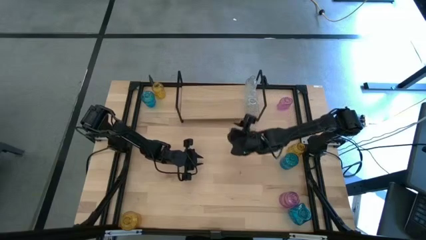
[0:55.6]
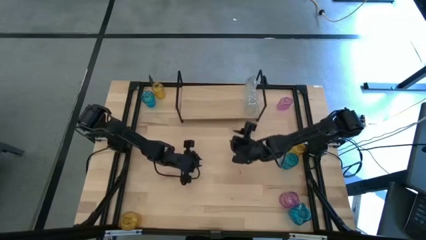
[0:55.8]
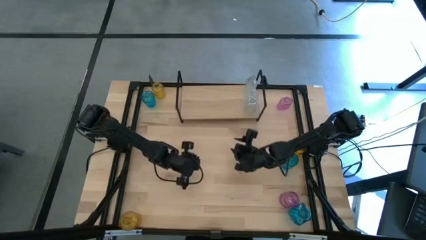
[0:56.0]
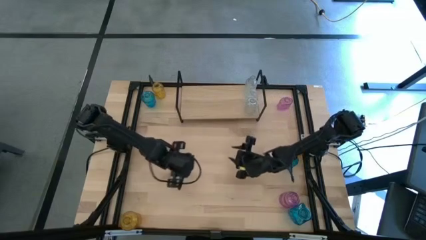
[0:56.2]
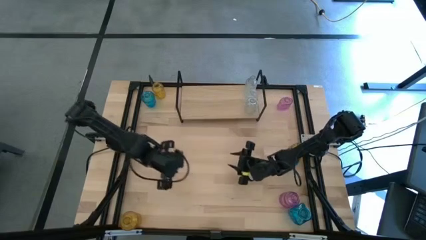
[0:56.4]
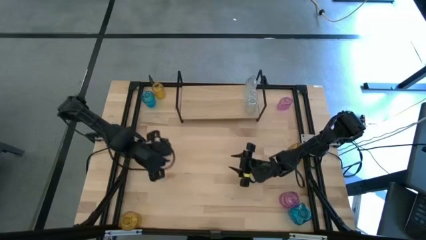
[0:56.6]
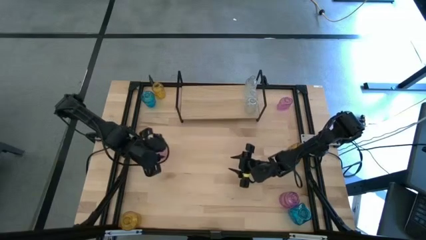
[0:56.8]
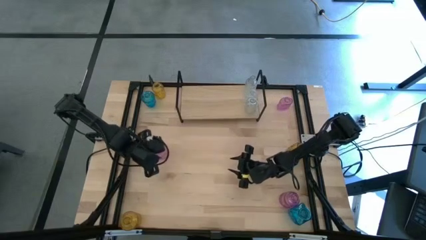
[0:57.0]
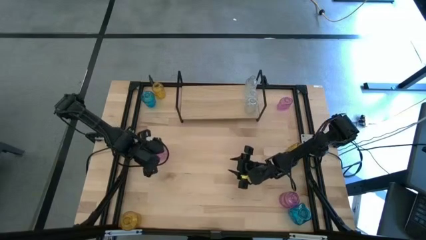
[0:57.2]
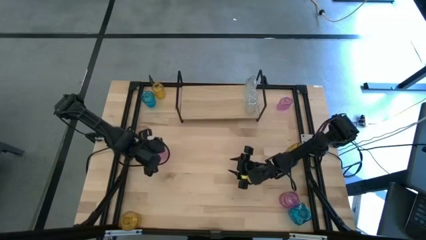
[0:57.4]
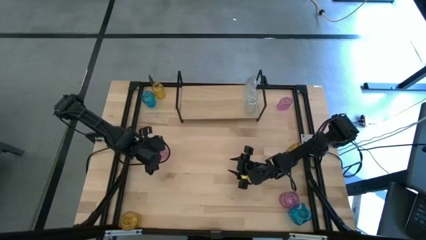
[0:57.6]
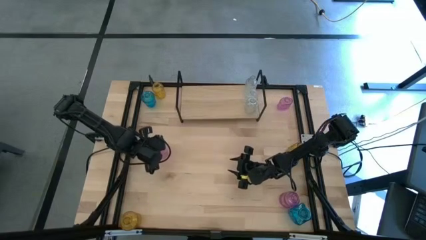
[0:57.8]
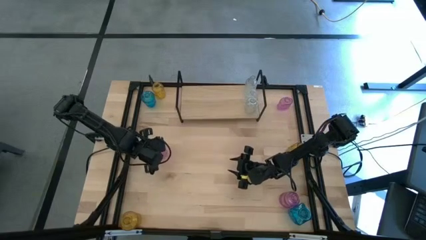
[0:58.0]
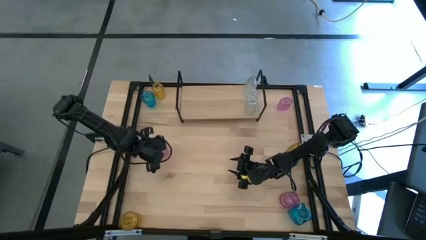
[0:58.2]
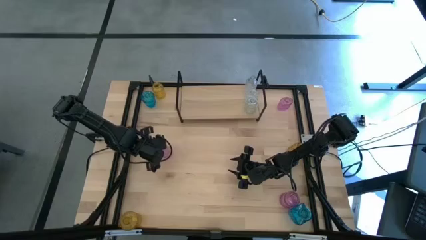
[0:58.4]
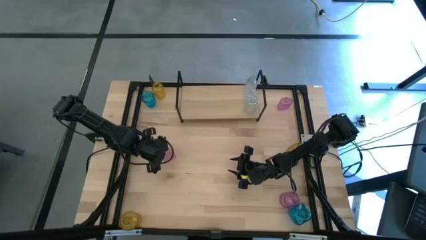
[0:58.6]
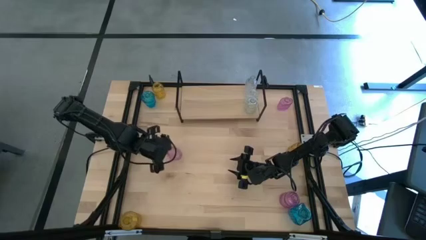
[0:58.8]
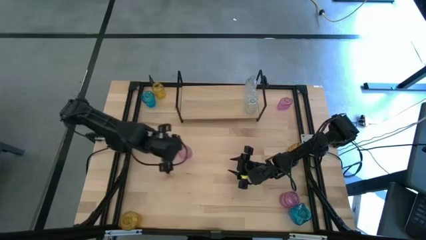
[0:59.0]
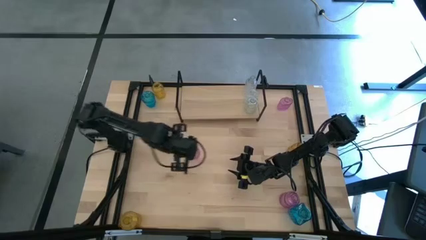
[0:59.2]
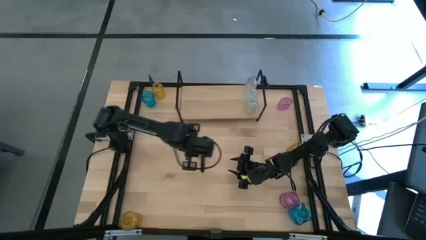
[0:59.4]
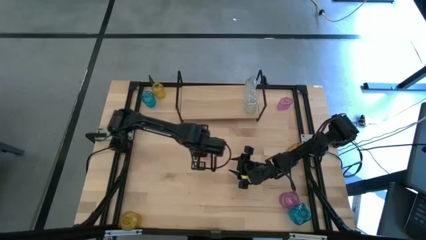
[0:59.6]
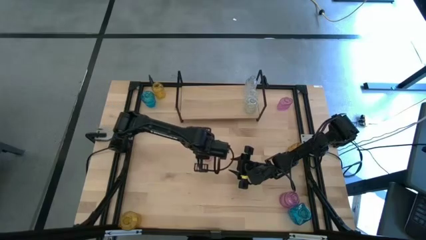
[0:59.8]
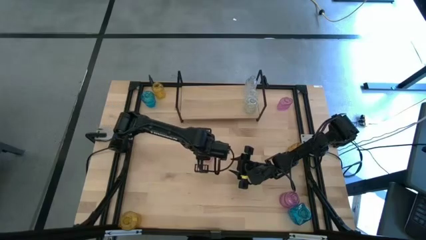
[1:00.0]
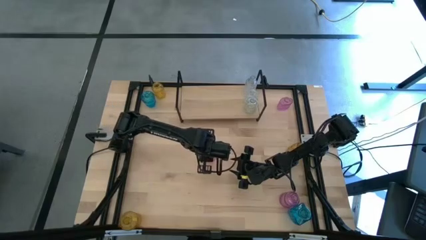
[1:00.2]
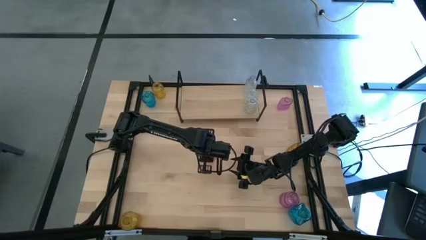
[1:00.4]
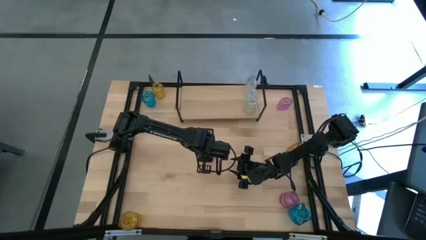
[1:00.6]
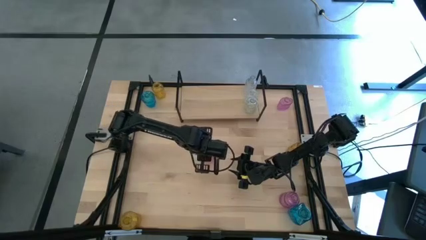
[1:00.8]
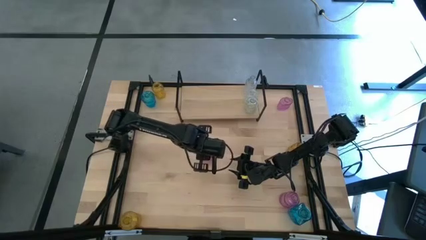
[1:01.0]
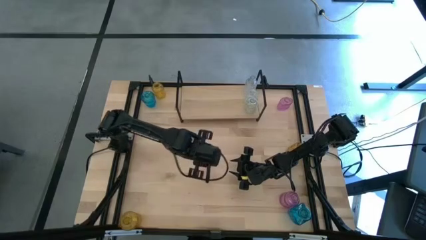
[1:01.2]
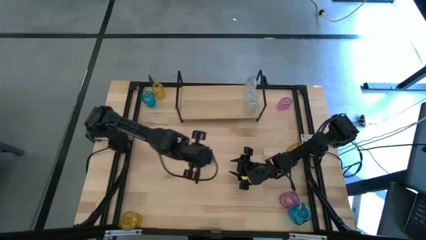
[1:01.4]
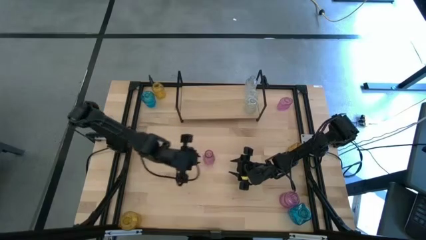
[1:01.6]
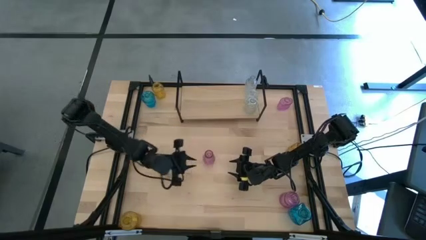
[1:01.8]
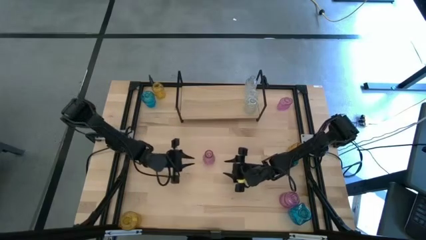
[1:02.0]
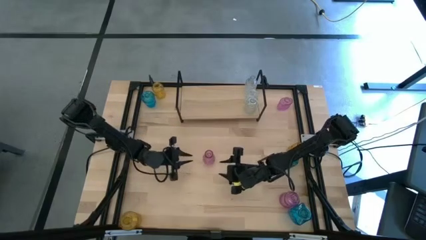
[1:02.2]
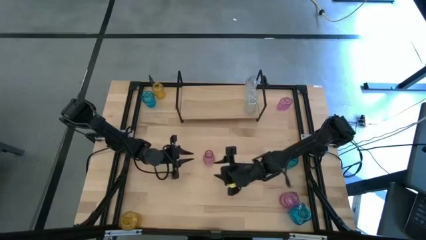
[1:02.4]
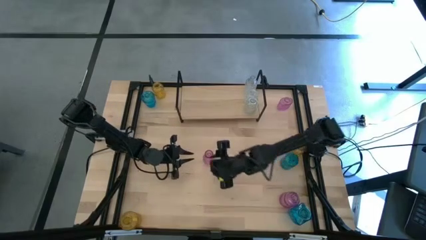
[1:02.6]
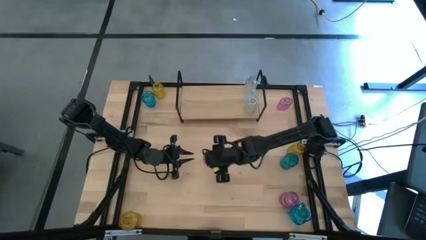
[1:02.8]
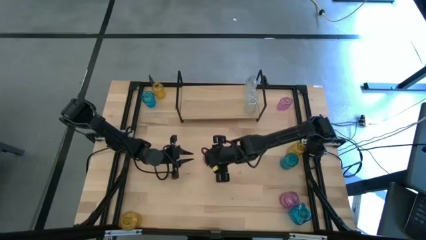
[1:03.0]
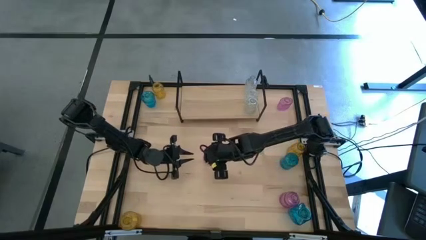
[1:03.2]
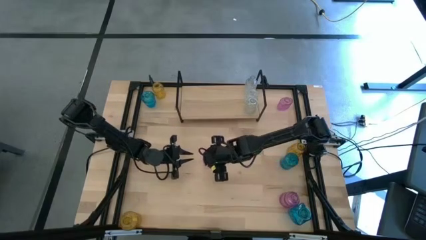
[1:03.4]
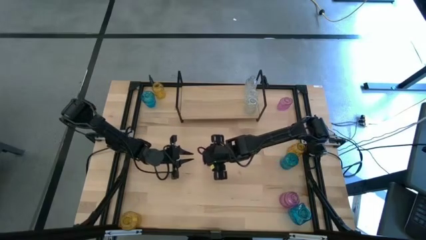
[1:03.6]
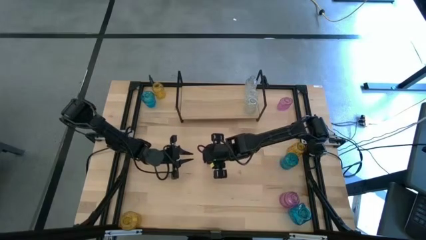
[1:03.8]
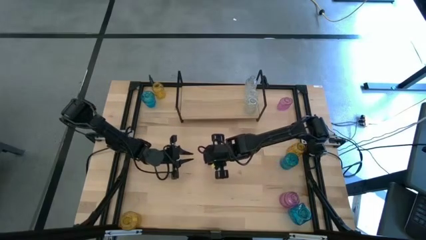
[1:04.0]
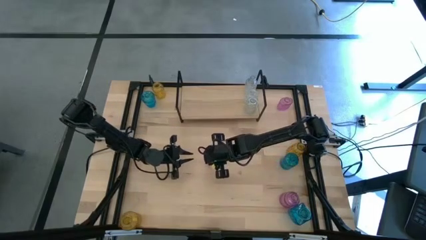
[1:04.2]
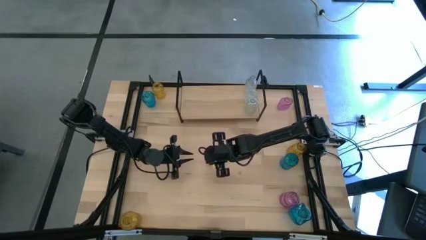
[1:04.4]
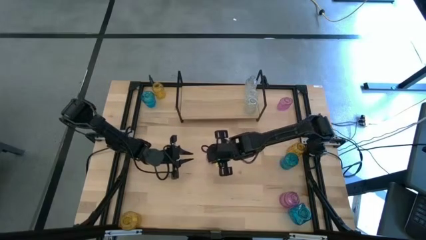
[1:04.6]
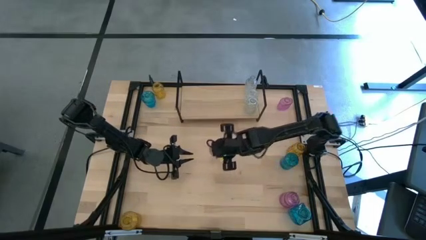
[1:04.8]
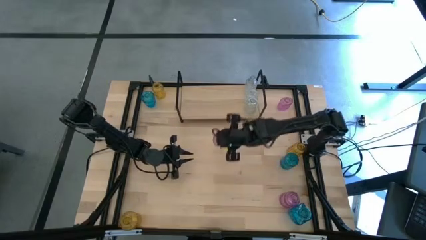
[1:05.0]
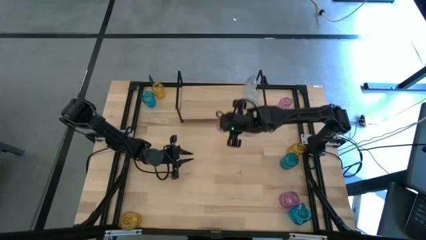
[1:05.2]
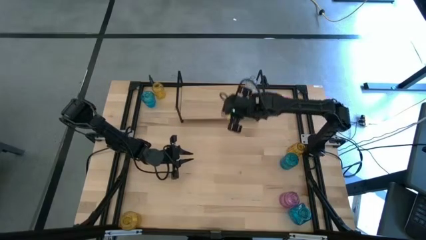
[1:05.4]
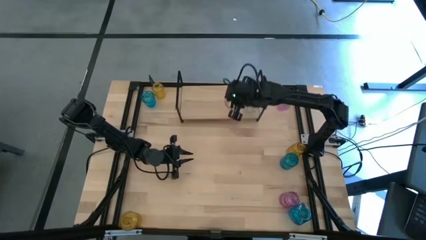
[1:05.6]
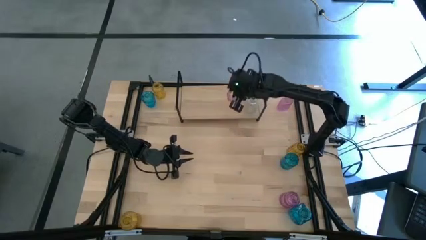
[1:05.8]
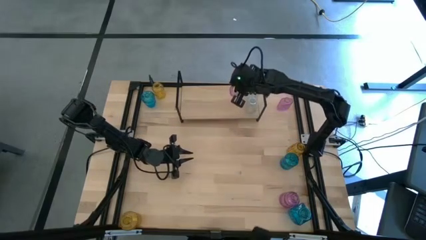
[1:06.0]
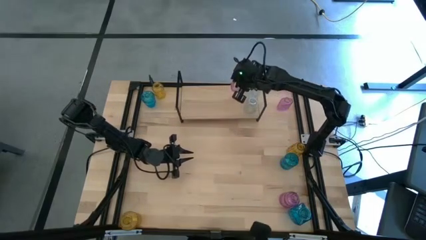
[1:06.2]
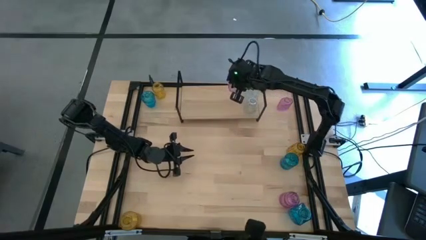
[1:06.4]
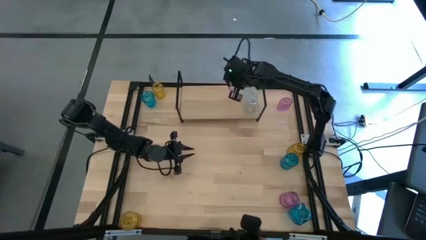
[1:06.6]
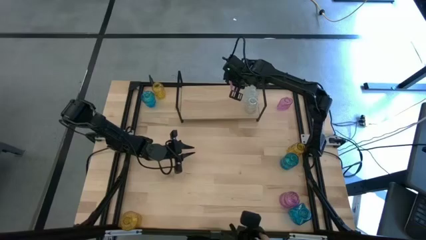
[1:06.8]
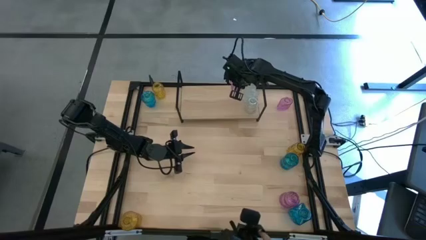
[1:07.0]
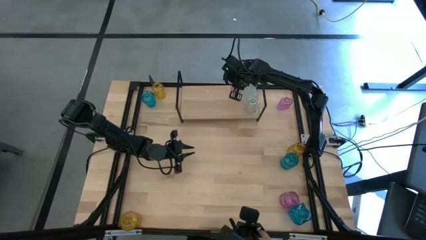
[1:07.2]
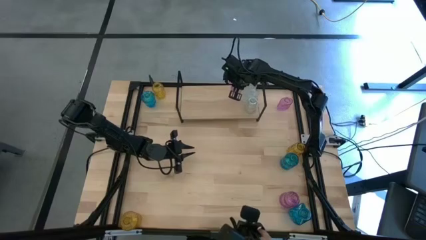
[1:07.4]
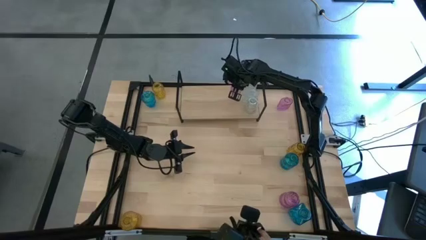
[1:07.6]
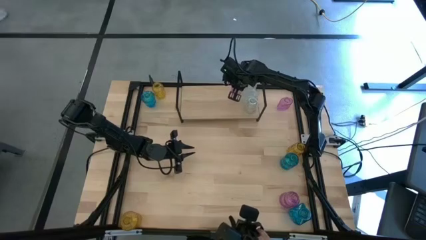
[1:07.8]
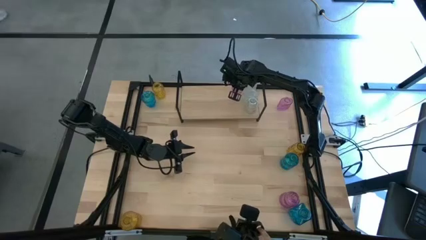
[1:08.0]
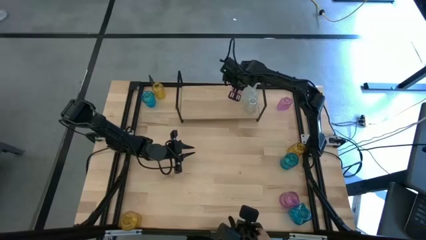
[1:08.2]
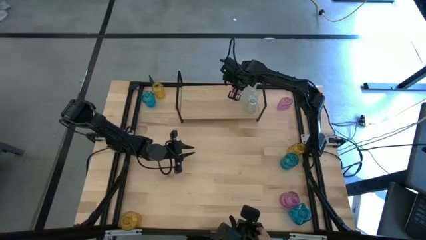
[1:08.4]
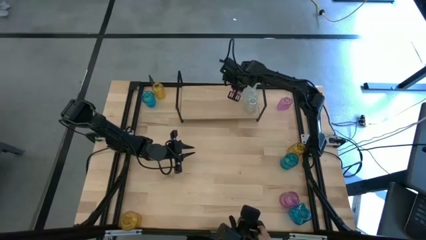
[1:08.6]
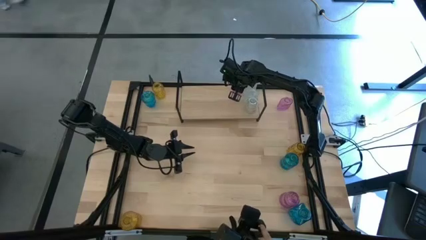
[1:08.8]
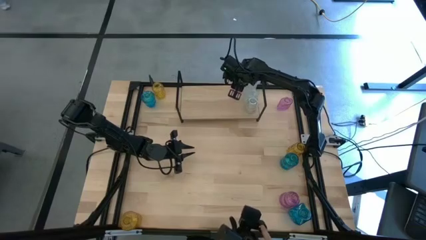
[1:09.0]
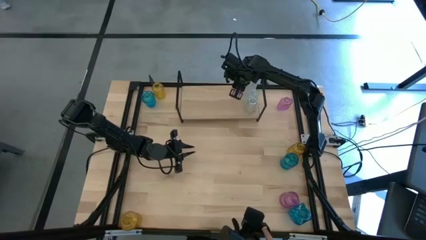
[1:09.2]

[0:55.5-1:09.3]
Task: sort vases onto shelf
Put the left violet vase to the left side of the top transparent vase on the shelf

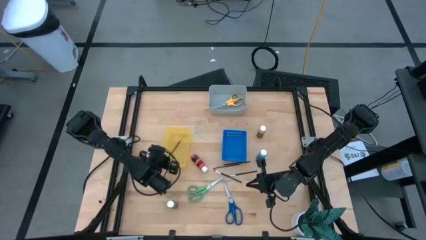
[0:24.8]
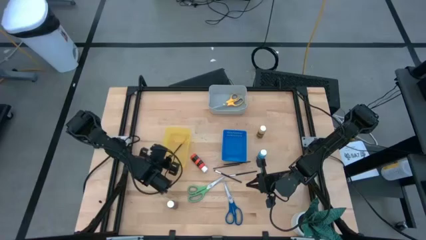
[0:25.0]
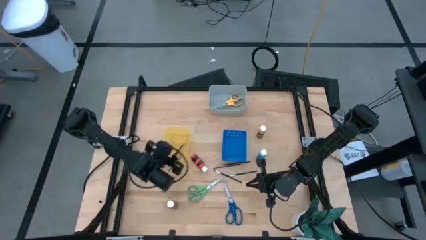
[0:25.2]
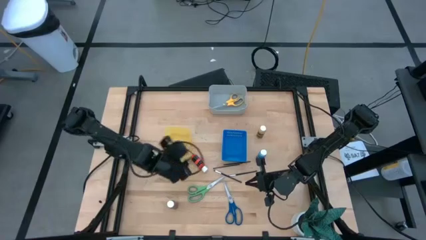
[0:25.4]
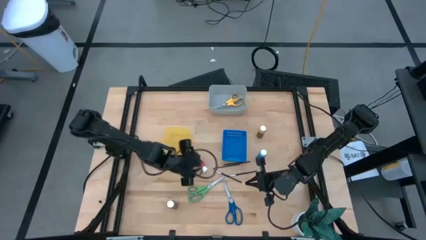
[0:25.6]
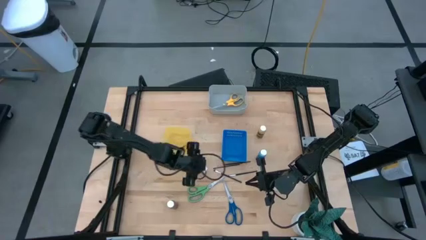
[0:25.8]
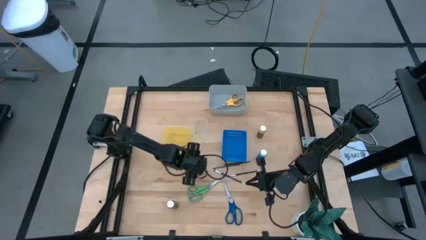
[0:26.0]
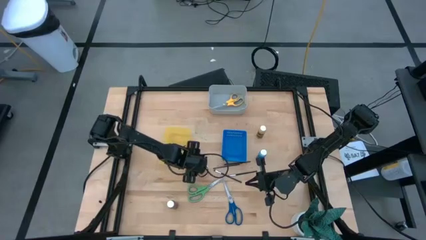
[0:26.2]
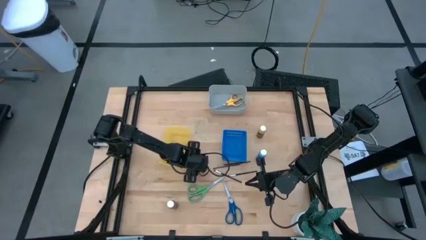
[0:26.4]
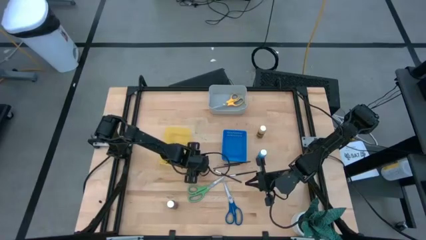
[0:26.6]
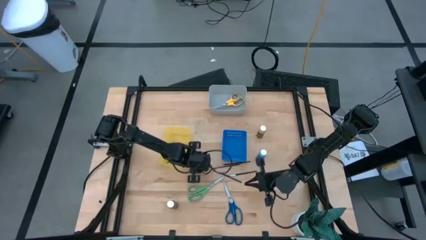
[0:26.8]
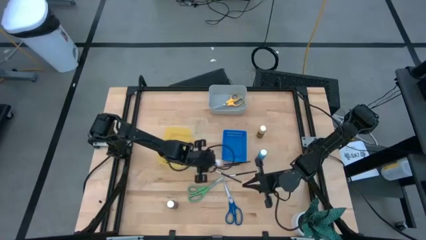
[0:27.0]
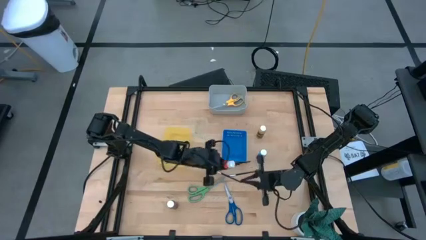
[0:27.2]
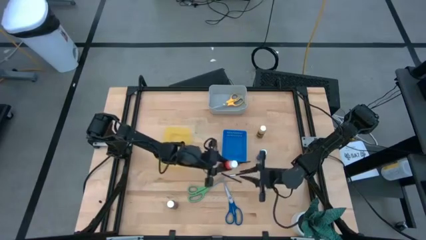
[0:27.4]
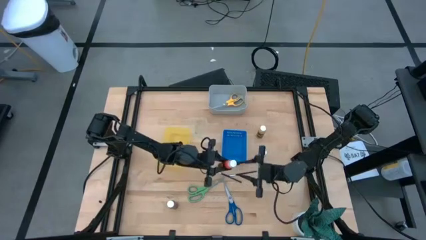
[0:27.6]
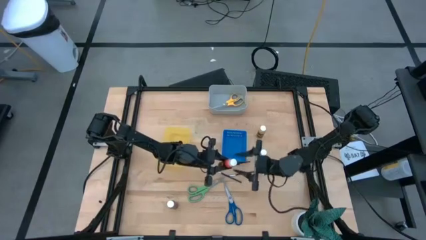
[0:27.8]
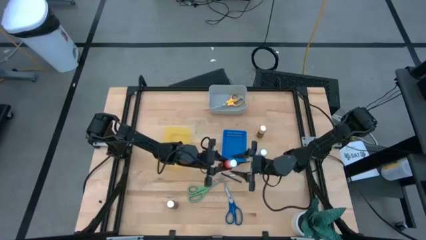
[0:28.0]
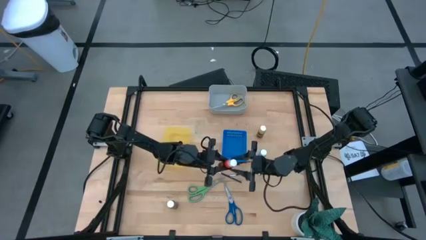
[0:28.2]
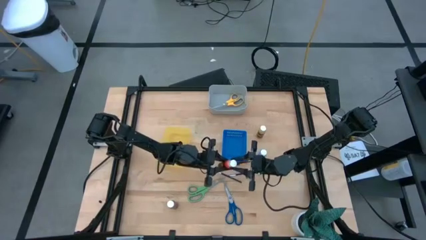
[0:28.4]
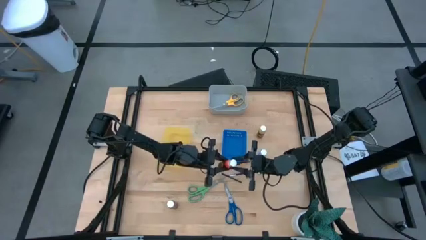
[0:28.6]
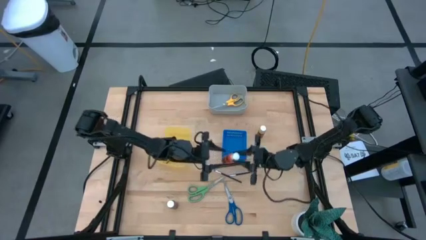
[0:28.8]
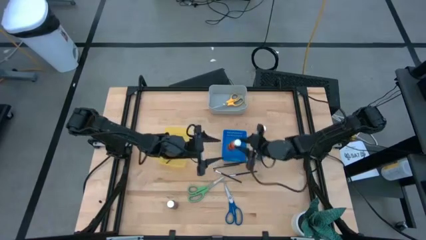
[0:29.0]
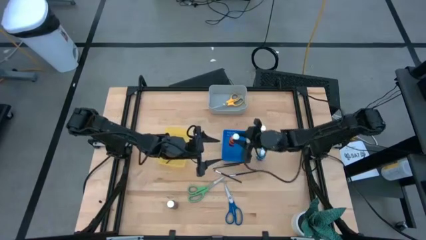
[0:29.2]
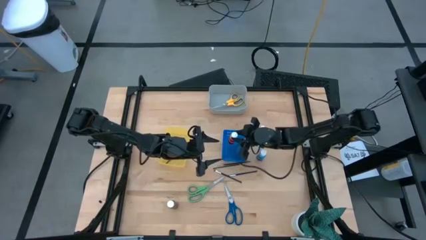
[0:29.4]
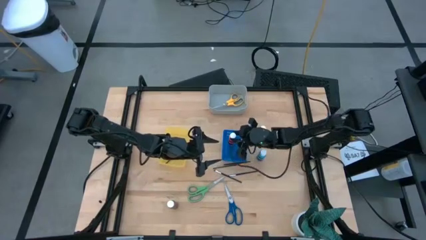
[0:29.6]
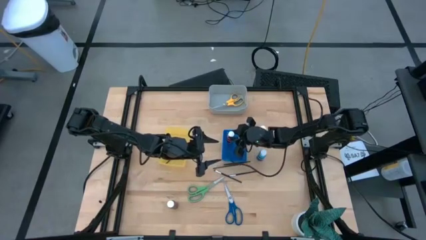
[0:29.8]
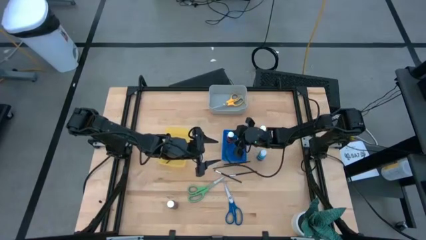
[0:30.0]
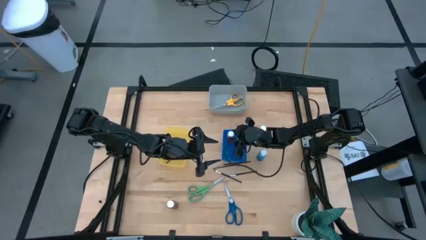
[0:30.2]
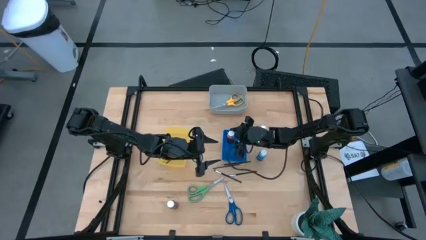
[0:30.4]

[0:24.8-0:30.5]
Task: Pick & Place Paint Supplies
Put the top orange paint bottle into the blue bin
